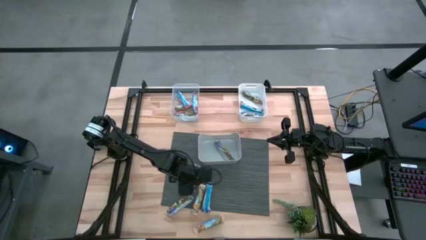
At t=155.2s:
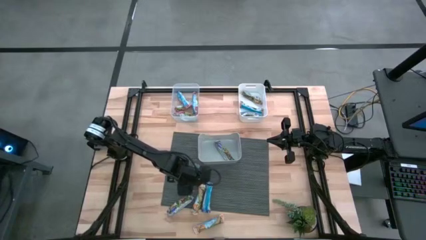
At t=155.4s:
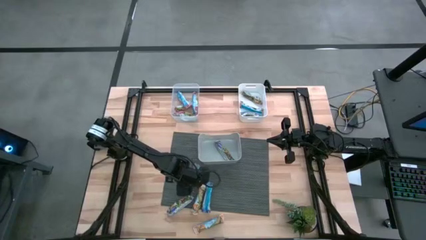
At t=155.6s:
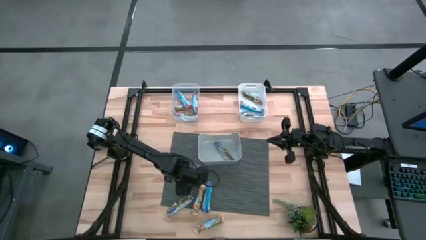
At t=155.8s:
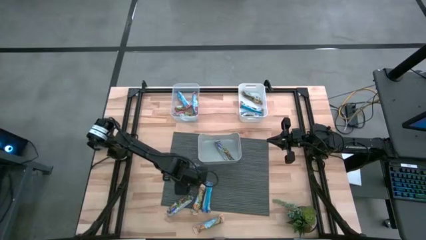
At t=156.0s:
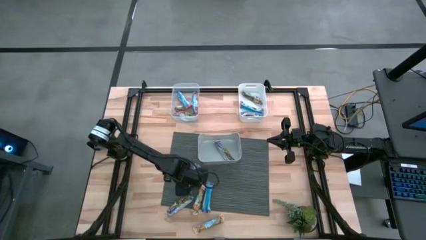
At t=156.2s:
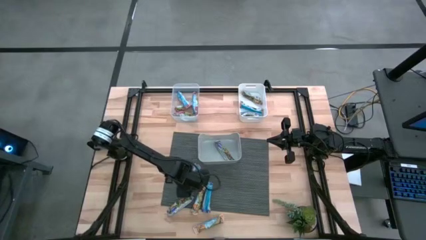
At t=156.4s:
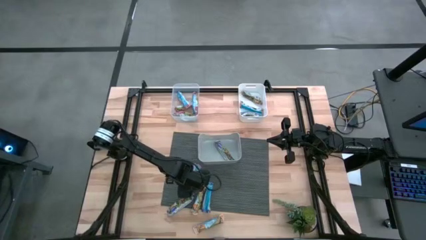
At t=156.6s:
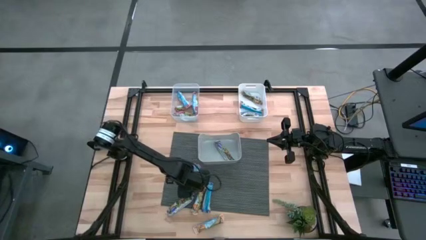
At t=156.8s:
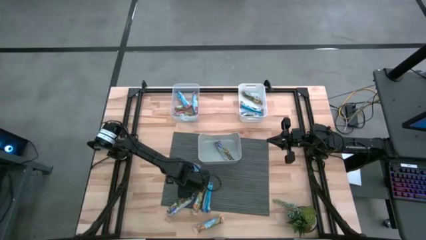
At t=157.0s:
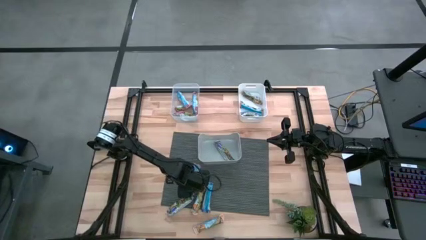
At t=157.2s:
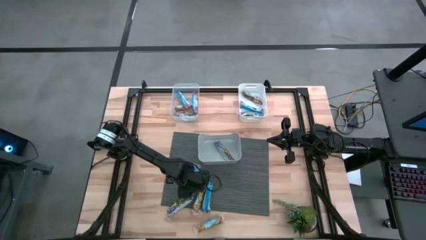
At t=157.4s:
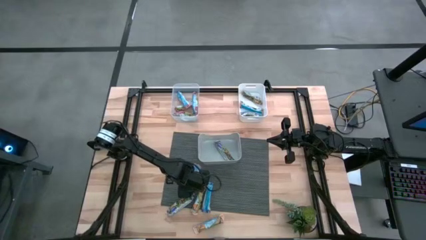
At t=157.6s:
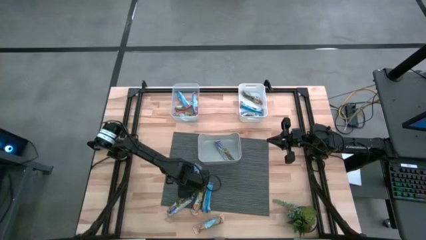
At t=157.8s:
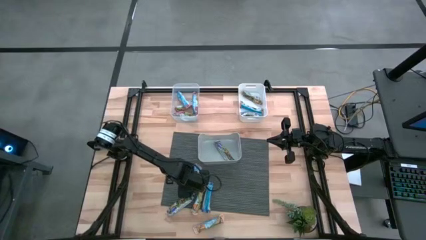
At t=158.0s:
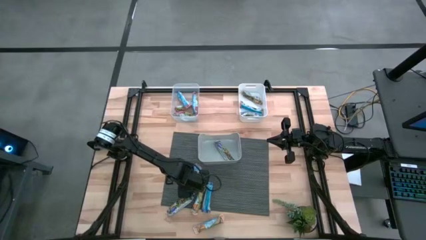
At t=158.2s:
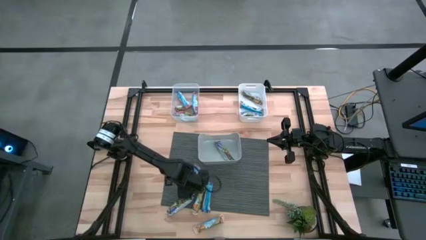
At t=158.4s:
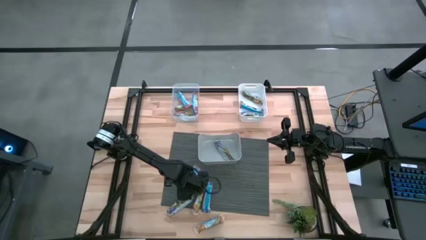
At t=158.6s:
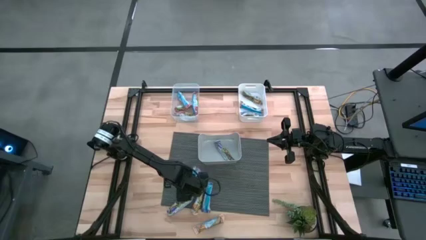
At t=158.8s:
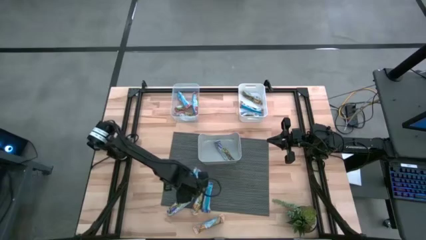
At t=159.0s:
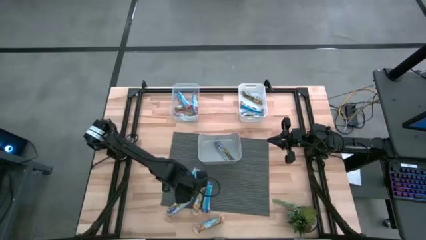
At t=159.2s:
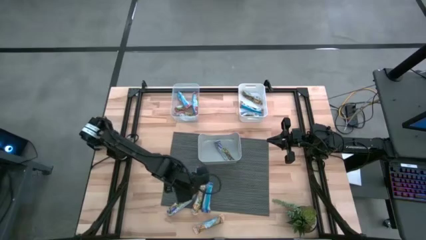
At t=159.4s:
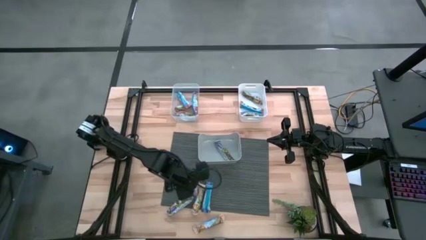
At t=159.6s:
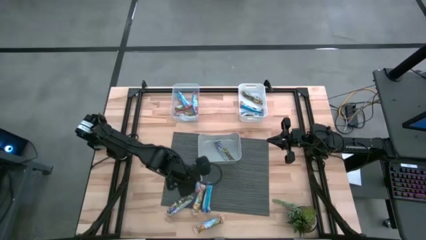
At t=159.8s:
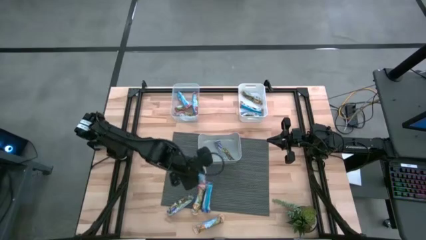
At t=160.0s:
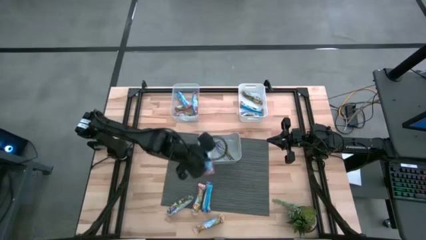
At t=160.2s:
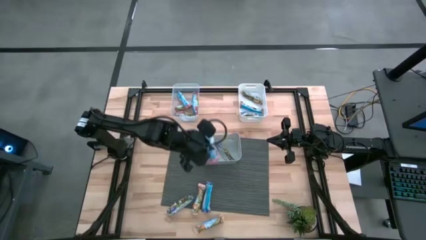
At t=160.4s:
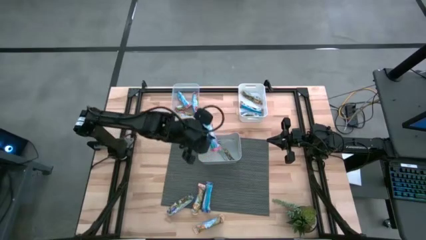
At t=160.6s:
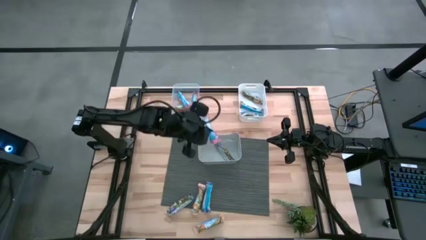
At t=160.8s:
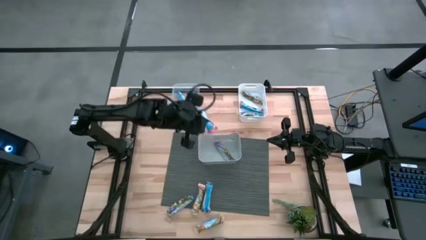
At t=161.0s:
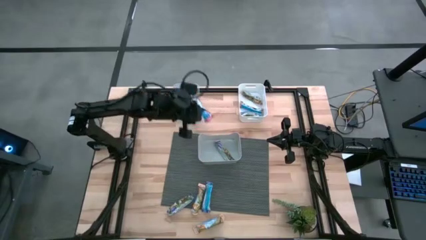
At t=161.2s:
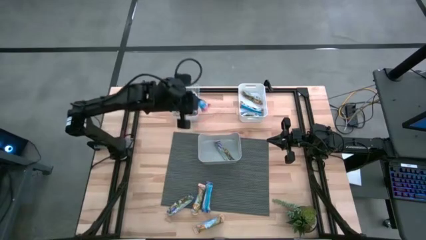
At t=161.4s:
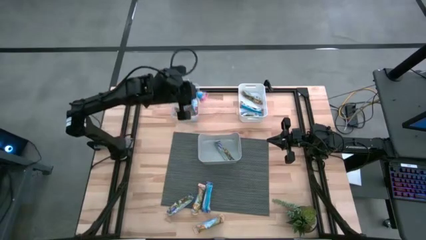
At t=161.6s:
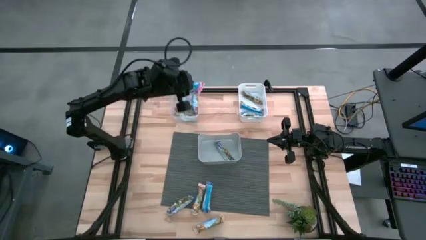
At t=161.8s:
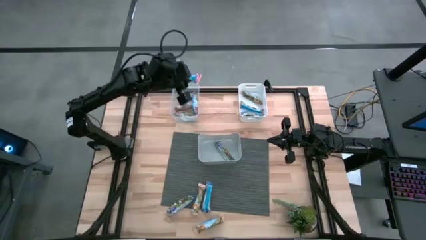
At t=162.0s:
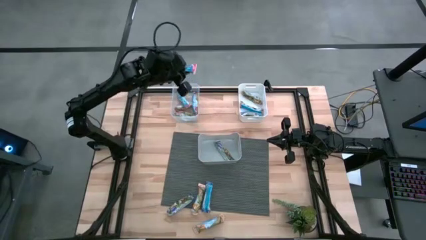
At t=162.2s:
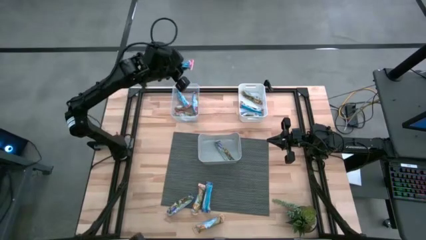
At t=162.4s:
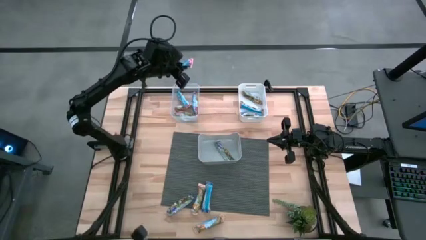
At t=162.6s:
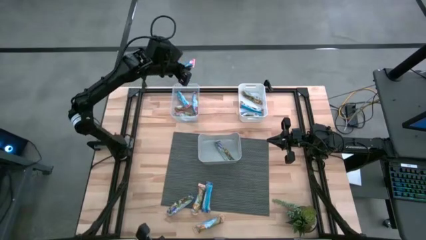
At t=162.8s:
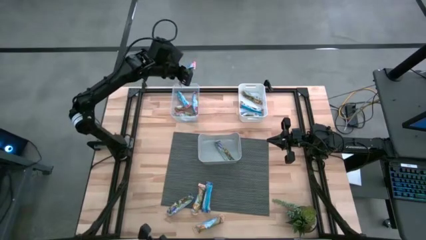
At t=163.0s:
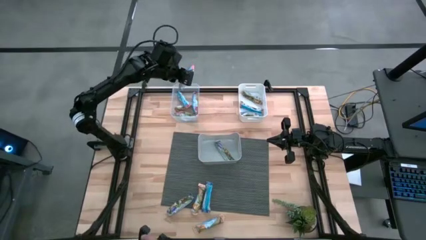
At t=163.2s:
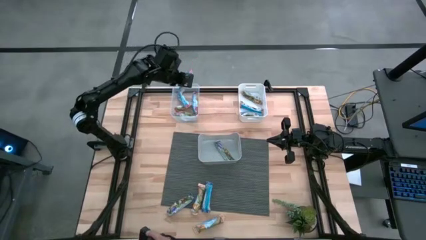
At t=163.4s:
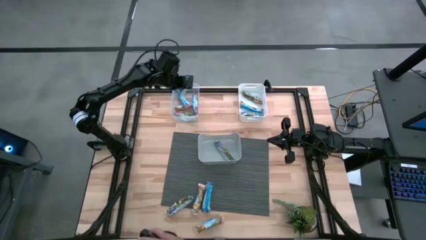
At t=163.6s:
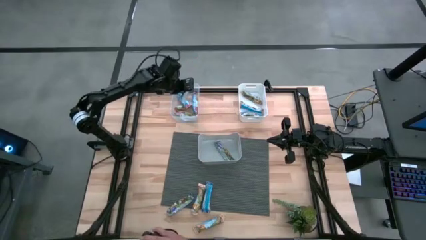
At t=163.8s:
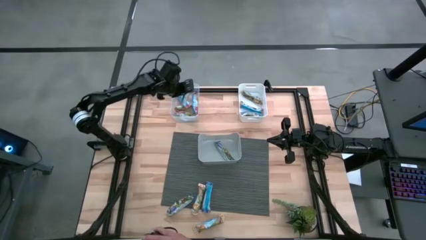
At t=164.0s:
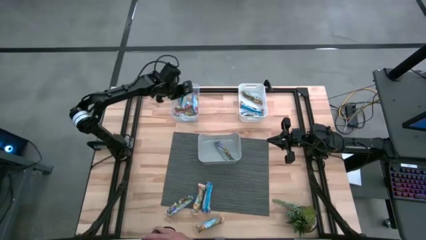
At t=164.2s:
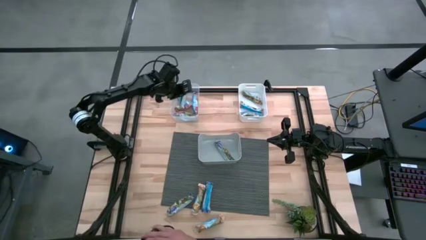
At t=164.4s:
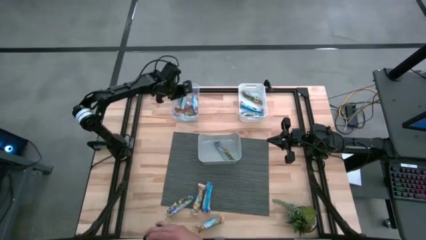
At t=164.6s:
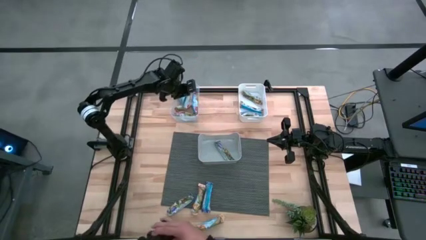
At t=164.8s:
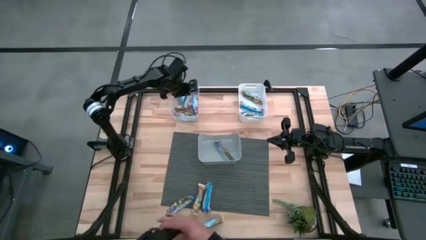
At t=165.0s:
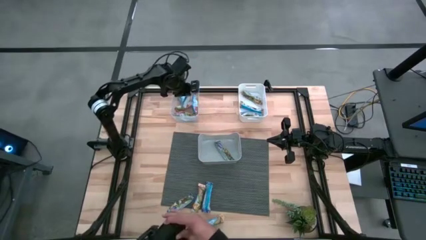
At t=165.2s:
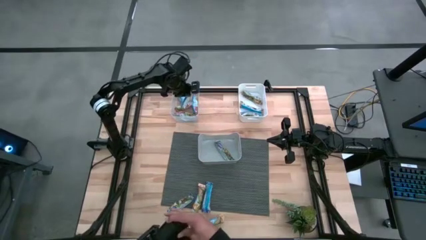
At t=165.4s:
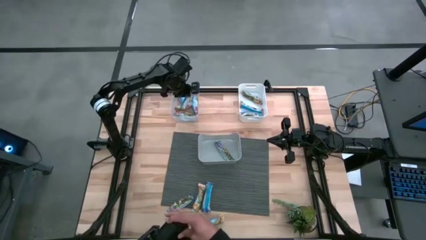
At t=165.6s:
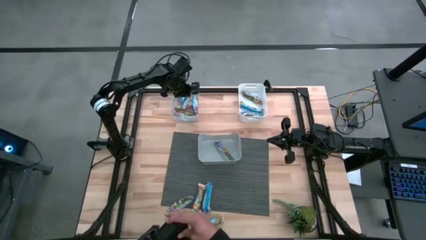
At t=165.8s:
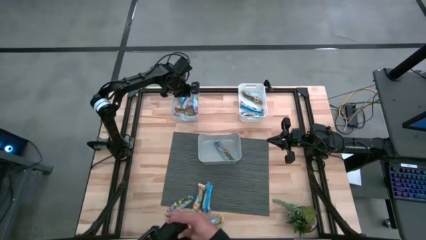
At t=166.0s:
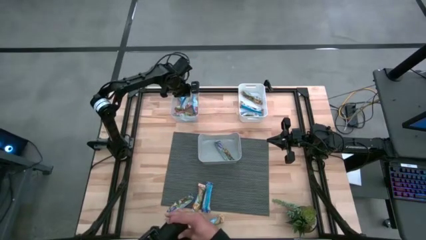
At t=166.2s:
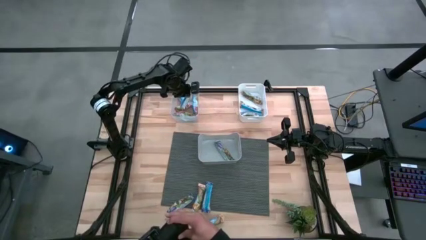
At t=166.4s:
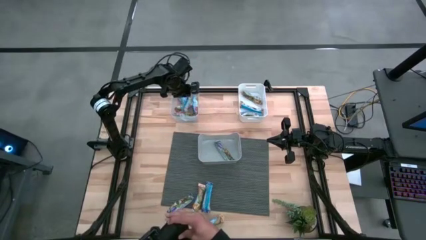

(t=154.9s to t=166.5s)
Task: Pick and place Granola Bars by type
Put the red granola bar into the transparent bin

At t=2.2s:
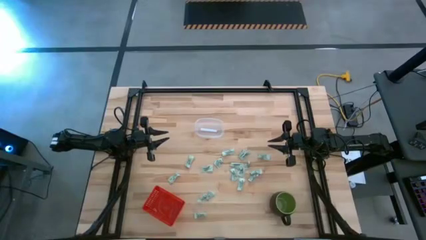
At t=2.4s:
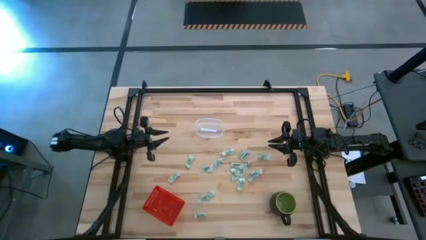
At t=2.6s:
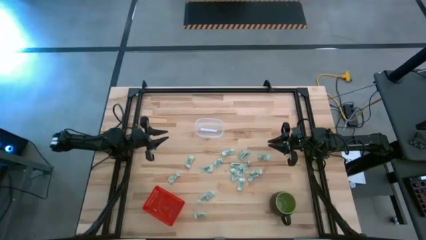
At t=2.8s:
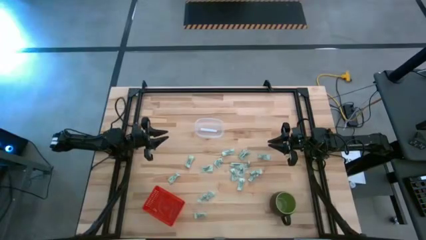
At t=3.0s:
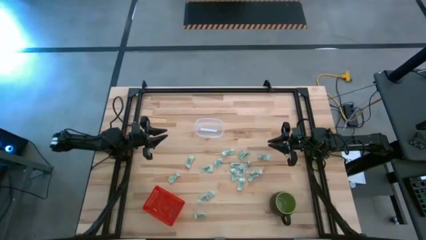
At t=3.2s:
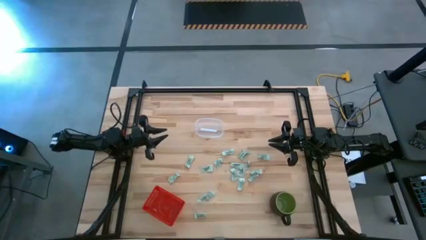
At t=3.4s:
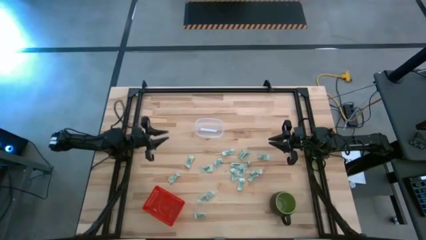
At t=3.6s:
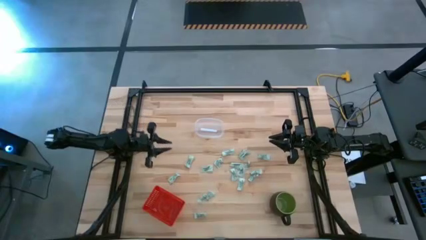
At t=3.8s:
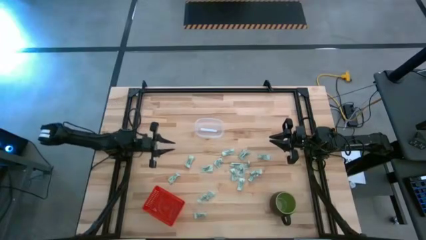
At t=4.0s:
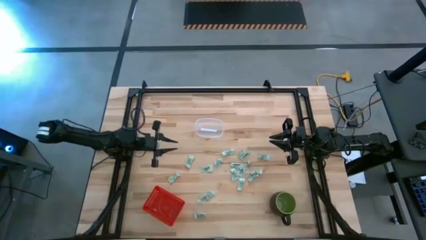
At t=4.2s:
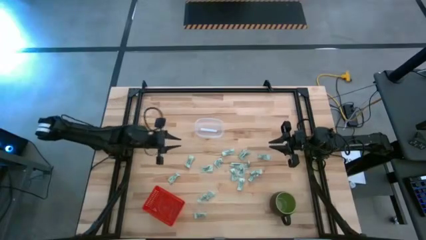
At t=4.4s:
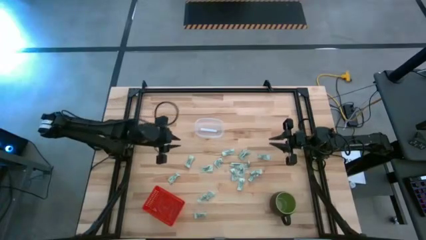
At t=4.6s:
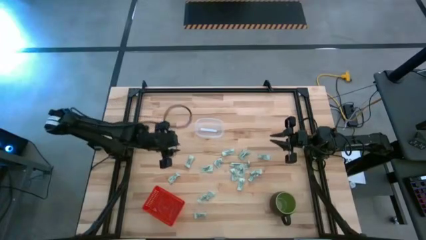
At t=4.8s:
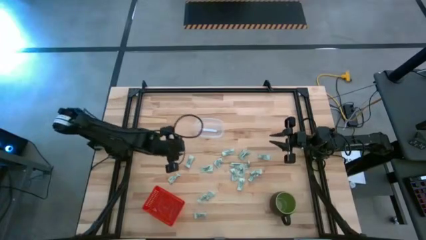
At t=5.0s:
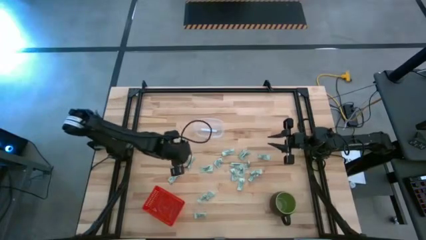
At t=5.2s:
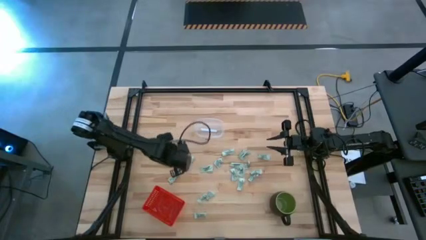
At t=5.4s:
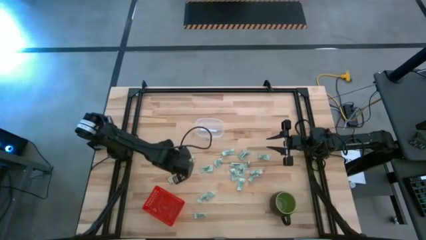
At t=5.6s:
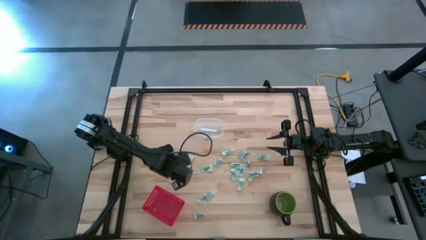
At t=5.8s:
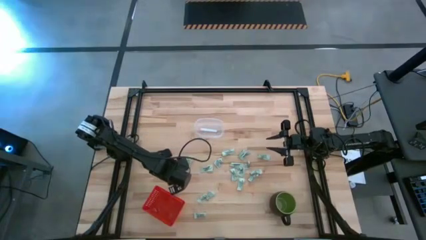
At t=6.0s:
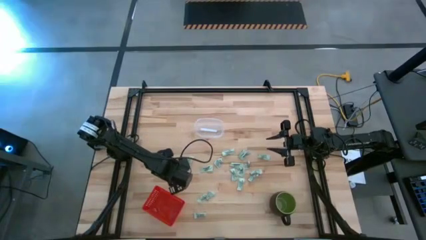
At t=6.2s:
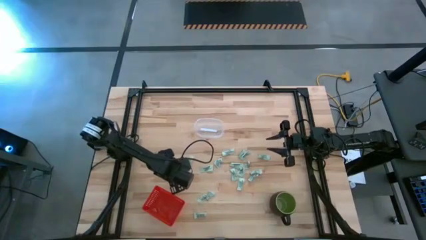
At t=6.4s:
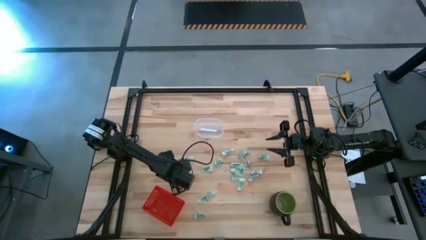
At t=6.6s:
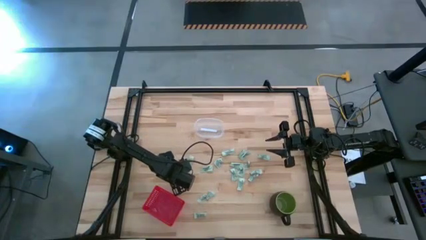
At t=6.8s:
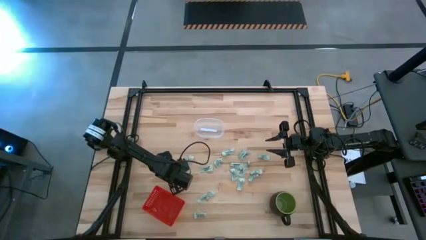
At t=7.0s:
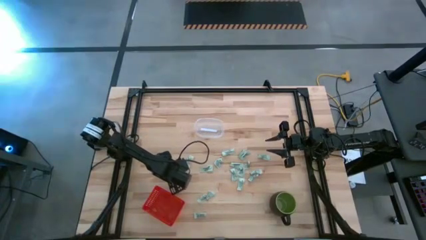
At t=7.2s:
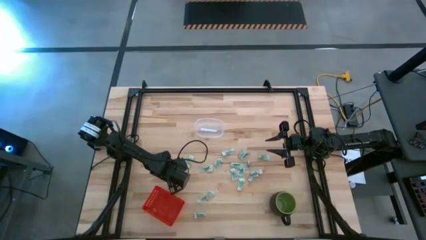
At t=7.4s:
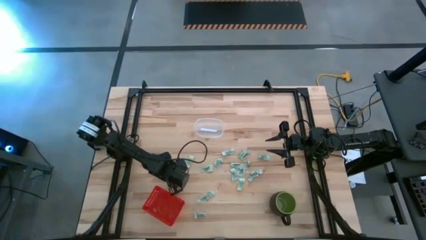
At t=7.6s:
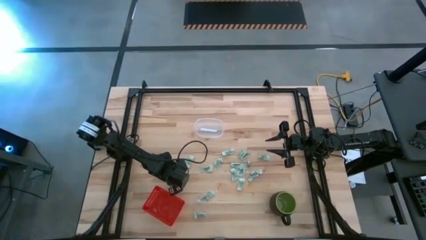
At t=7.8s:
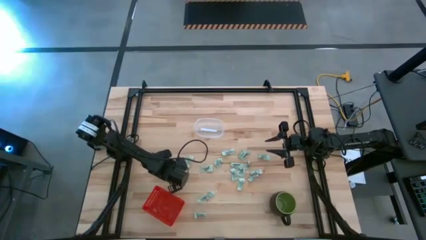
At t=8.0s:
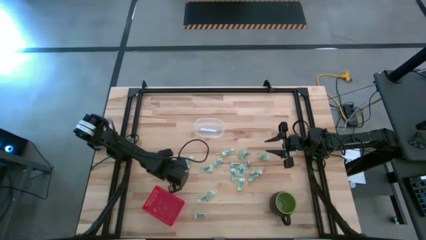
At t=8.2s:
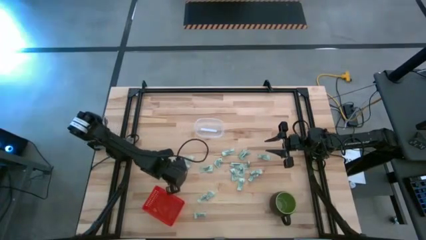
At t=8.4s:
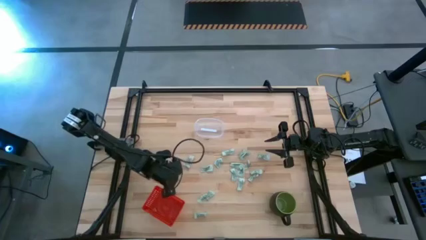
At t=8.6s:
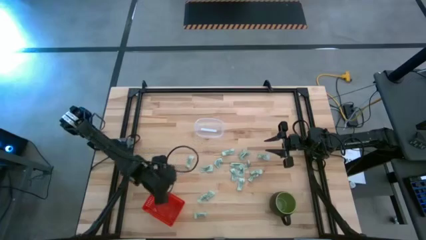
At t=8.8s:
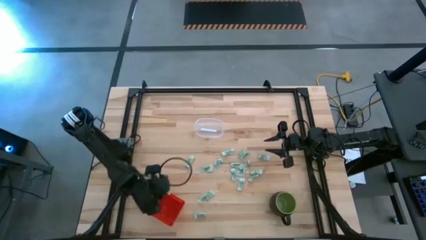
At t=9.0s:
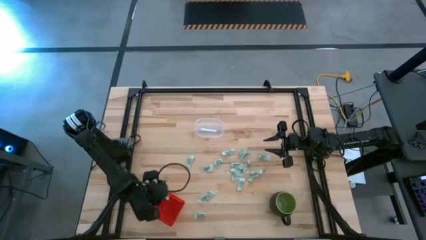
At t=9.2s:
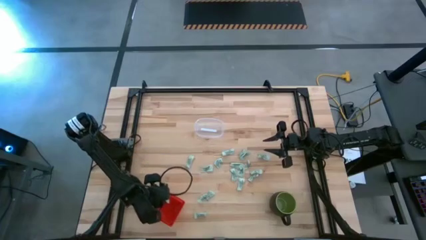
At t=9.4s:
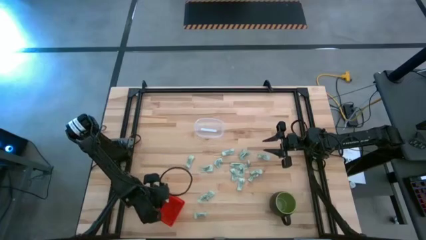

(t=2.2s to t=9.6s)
Task: Pick and place items into bin
Put the stevia packet into the orange bin
